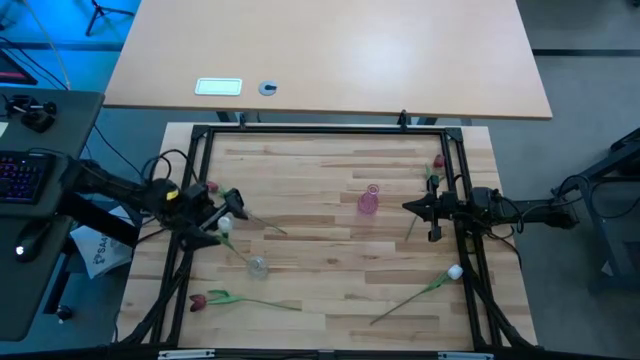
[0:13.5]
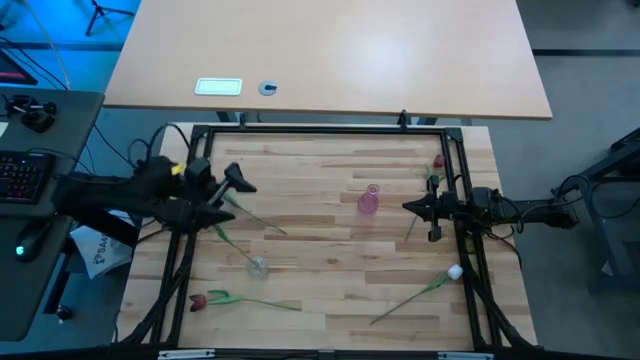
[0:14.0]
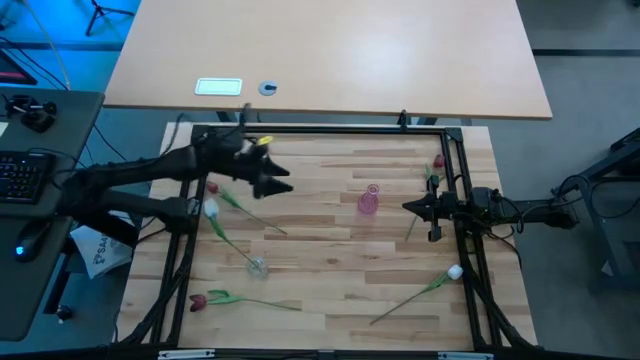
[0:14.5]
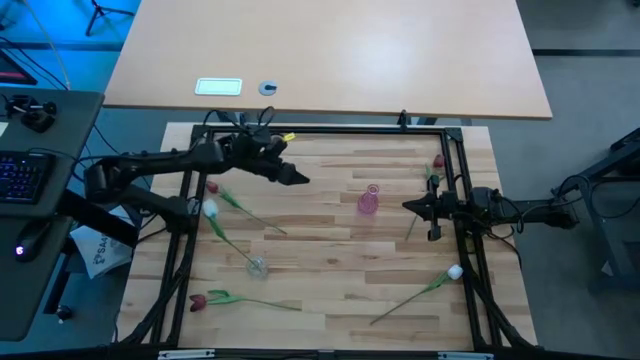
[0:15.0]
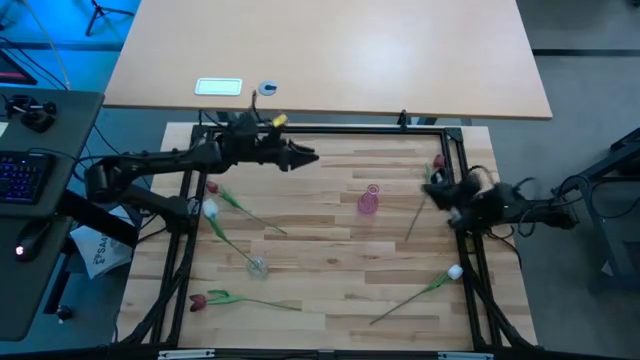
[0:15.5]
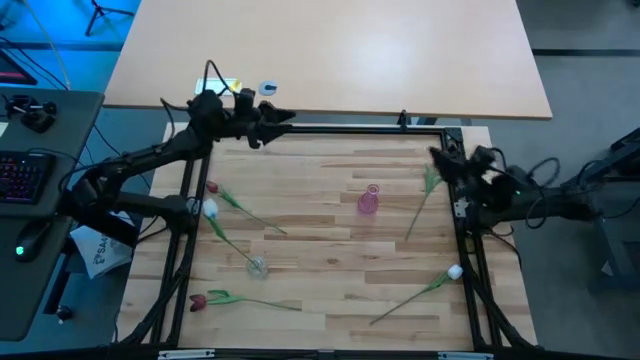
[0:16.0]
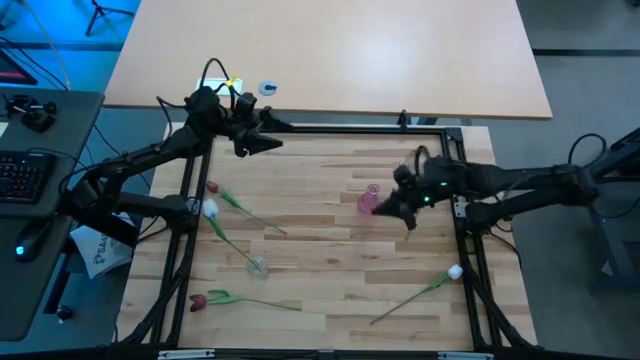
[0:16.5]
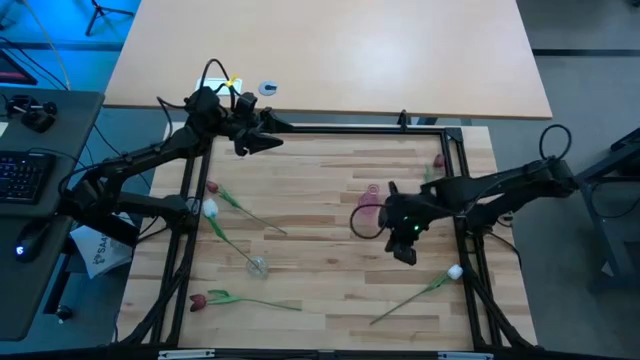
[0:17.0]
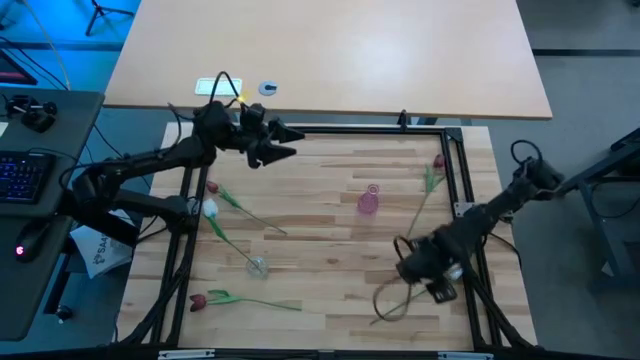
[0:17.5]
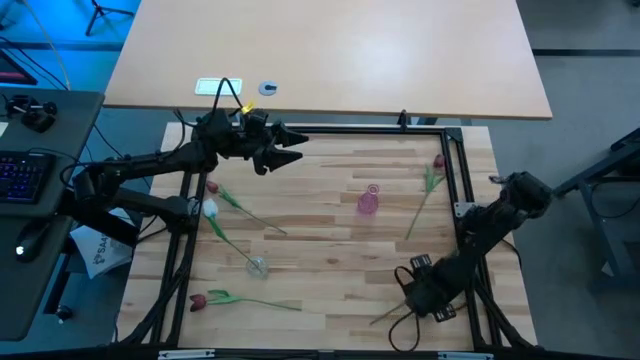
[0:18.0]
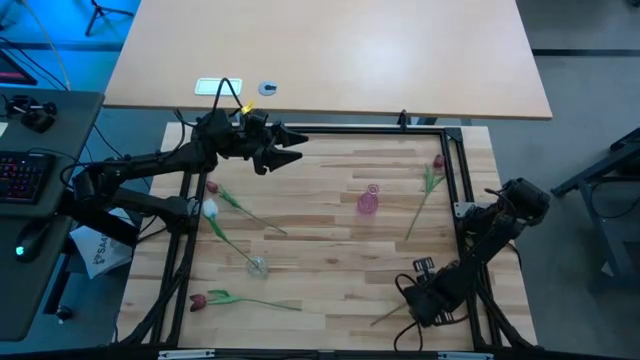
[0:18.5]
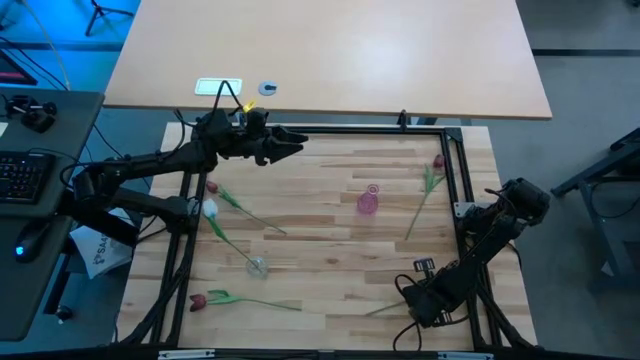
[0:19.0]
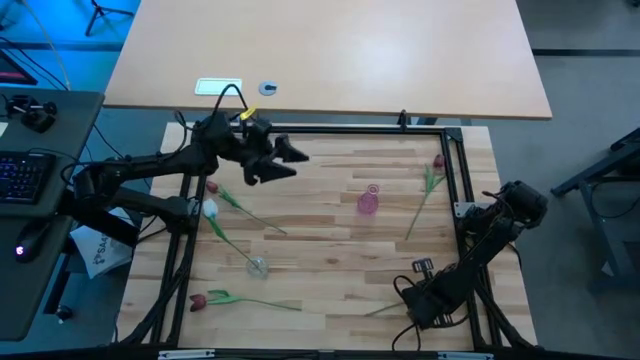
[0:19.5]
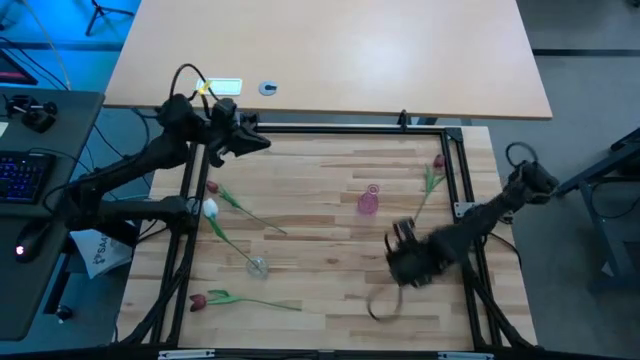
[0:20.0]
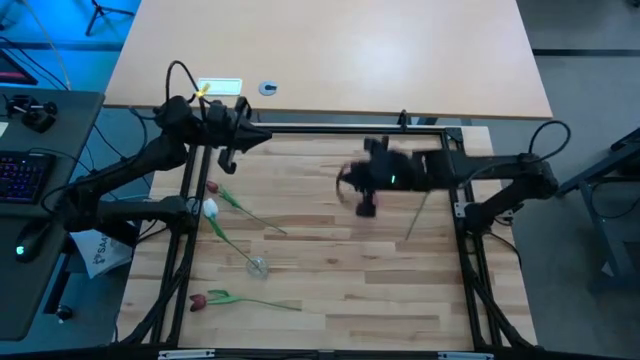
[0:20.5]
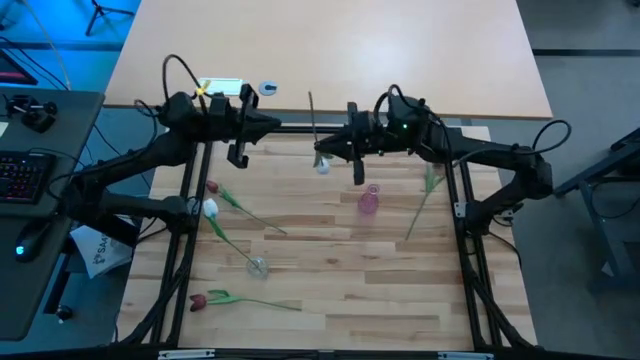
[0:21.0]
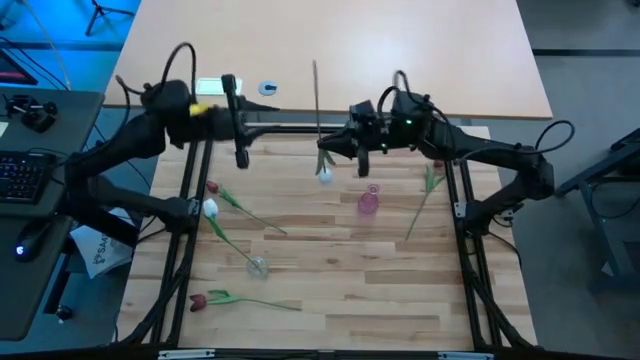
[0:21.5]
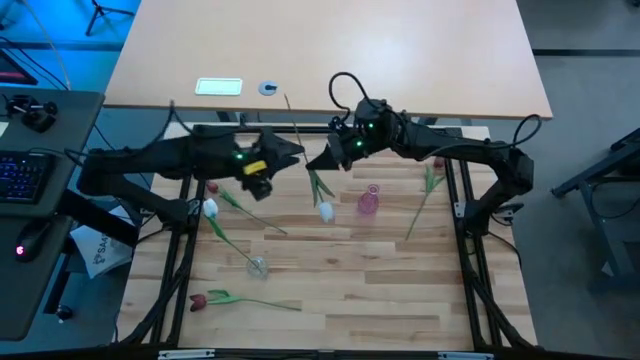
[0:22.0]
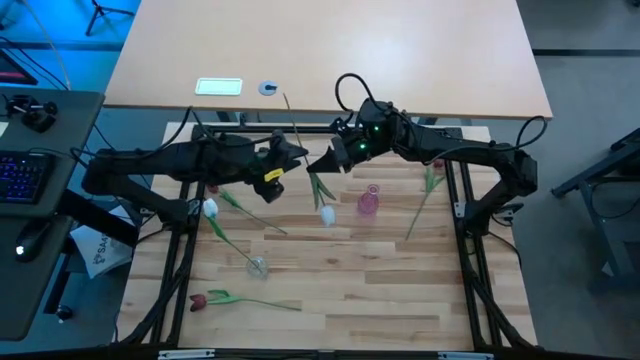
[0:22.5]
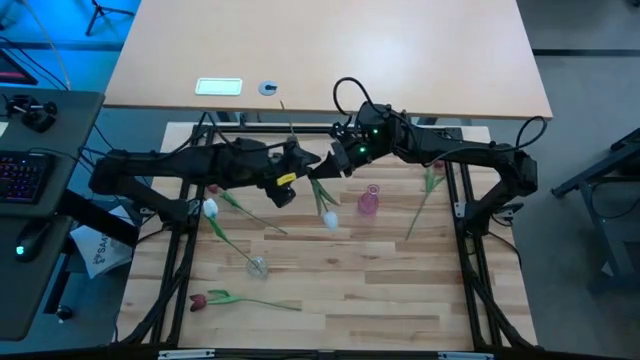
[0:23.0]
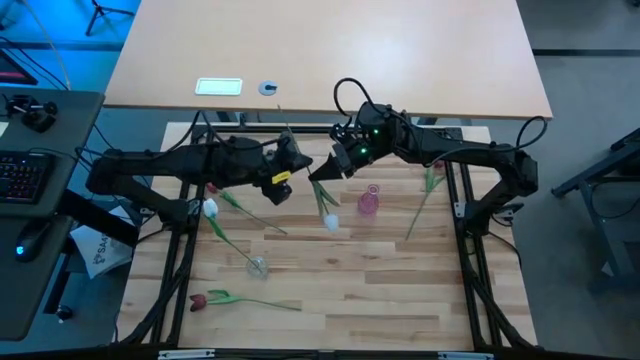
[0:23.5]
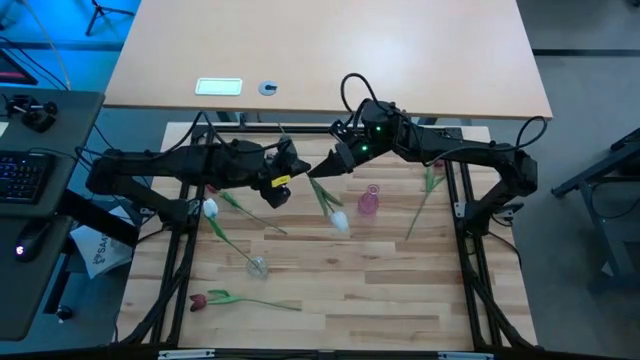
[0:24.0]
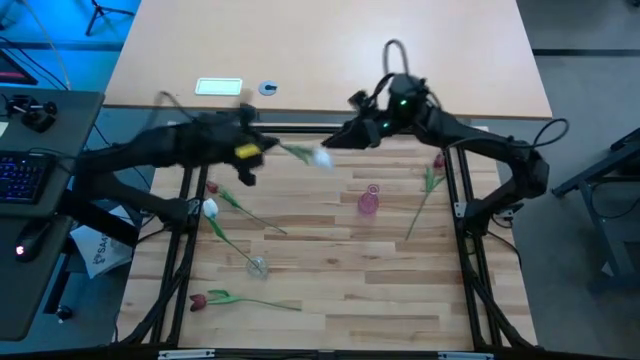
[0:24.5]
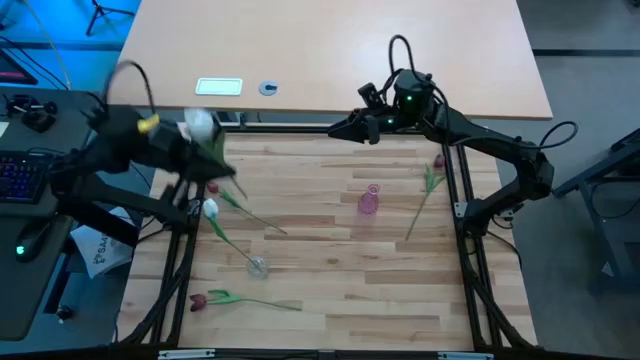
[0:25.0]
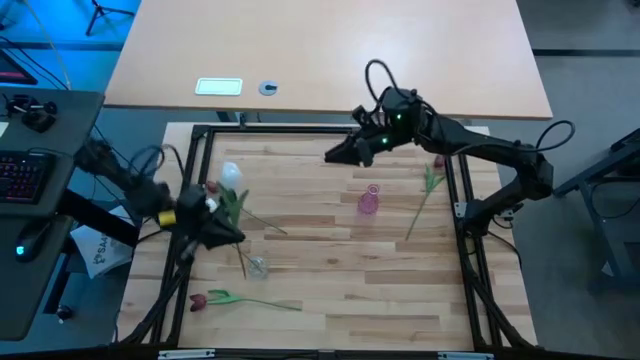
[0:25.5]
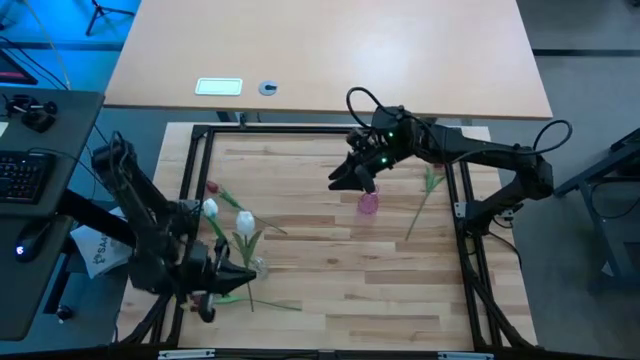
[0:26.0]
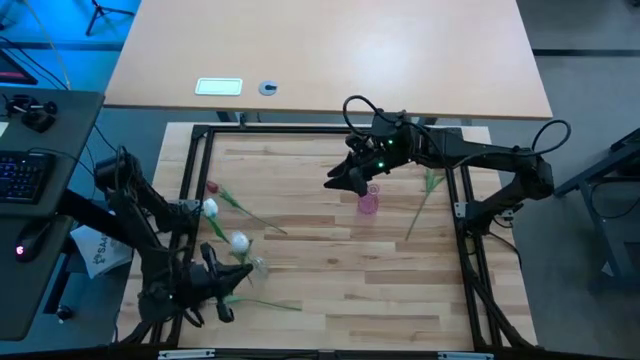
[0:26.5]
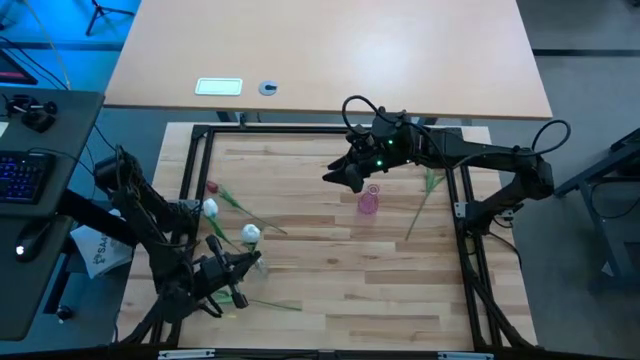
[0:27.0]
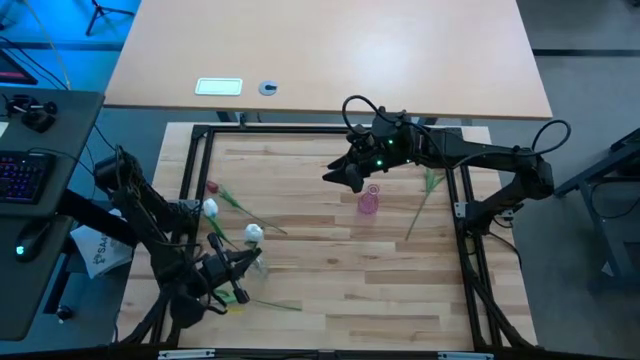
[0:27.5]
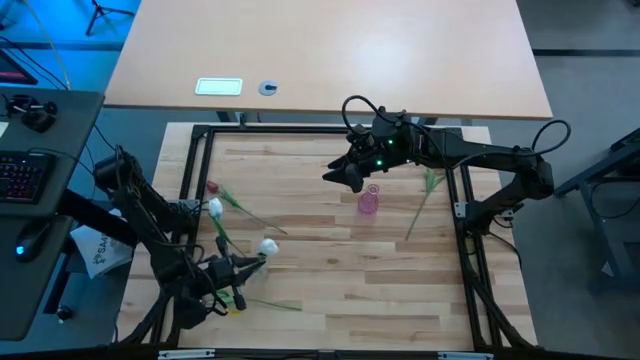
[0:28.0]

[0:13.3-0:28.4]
Task: Sort flowers into vase by color
Put the white flower into the transparent vase

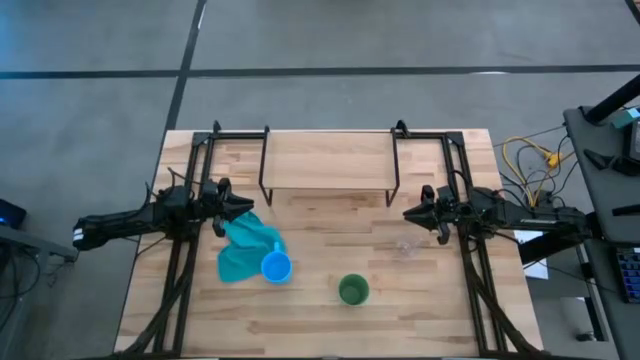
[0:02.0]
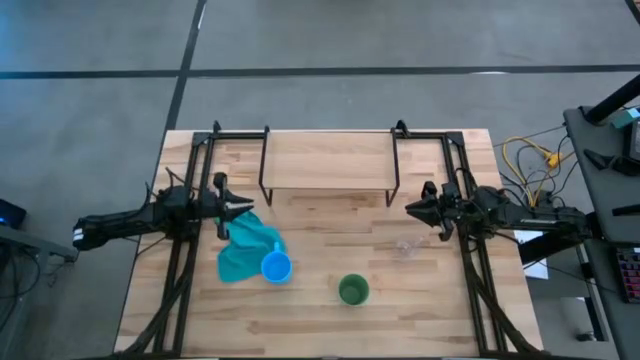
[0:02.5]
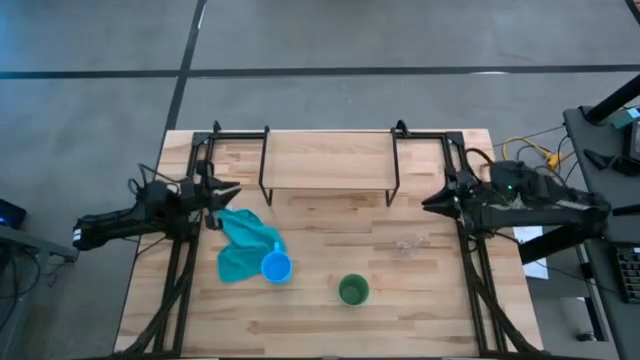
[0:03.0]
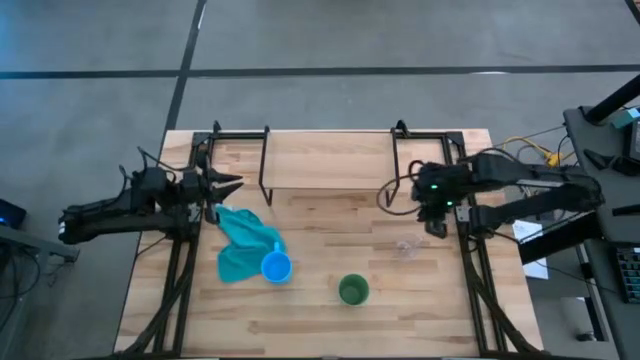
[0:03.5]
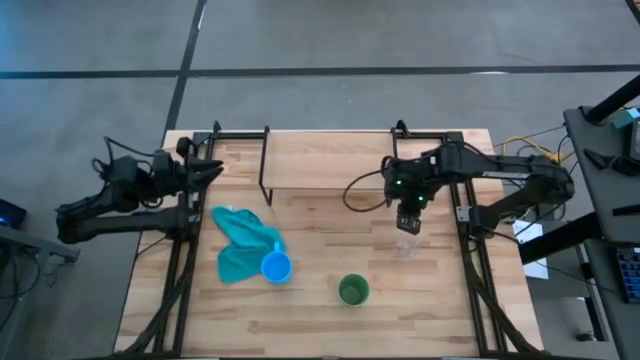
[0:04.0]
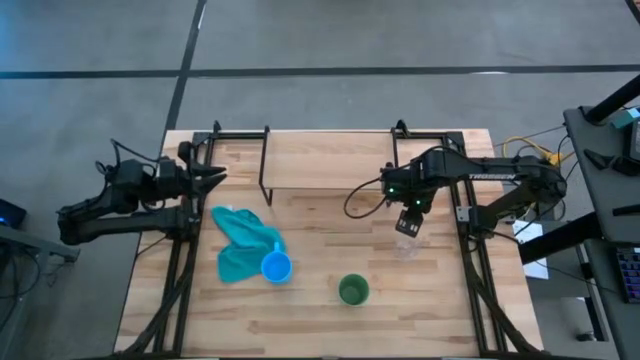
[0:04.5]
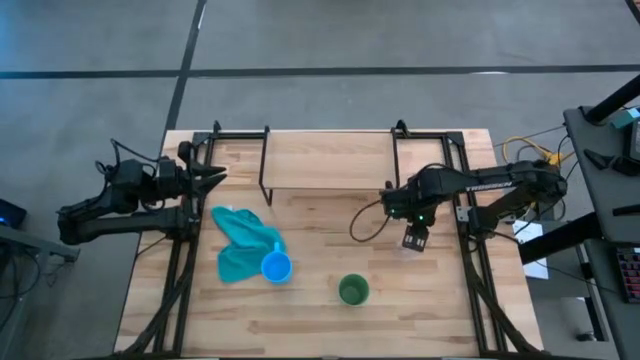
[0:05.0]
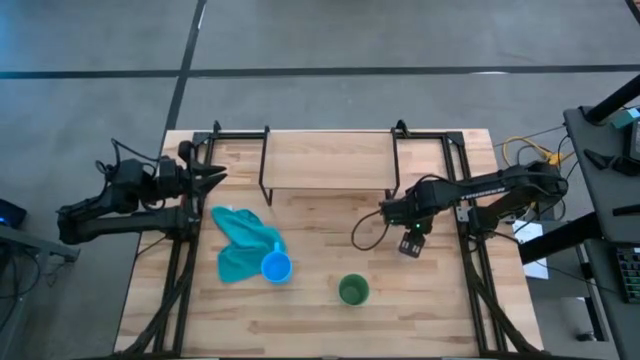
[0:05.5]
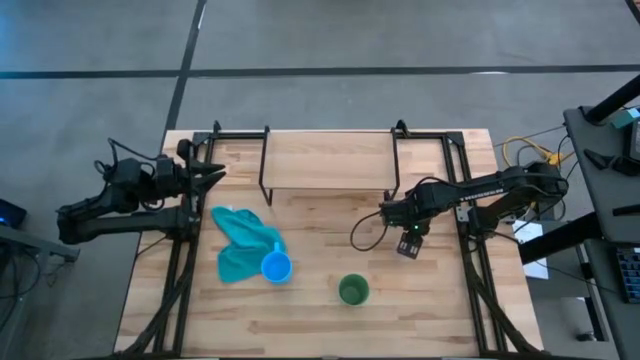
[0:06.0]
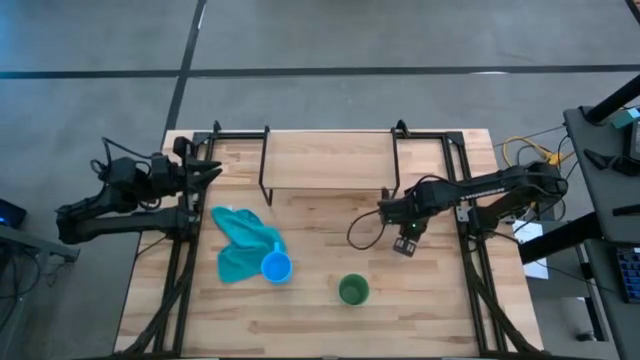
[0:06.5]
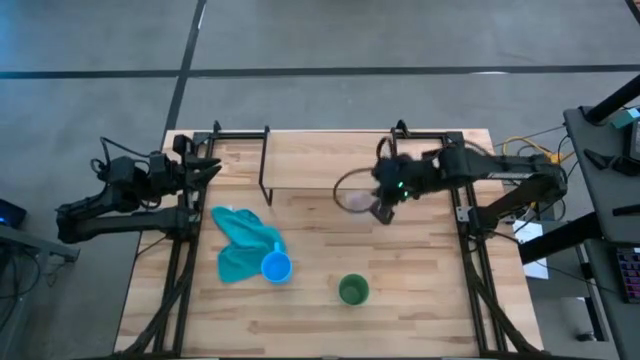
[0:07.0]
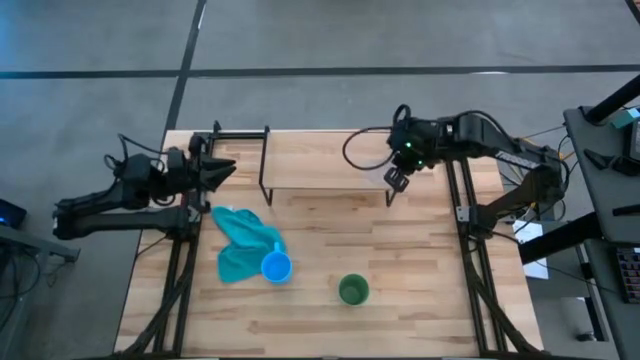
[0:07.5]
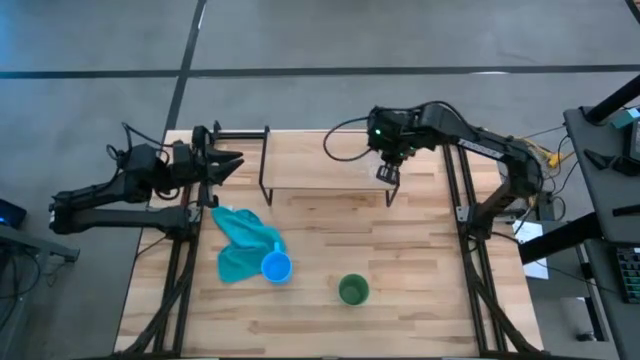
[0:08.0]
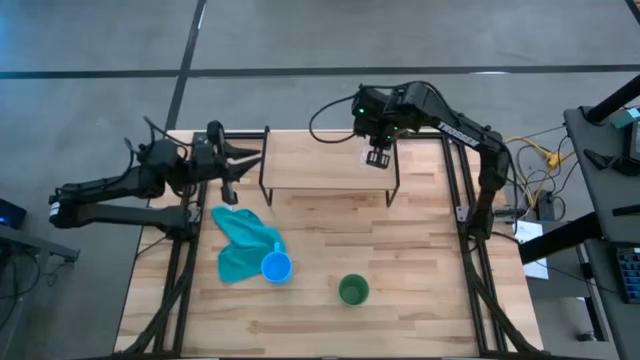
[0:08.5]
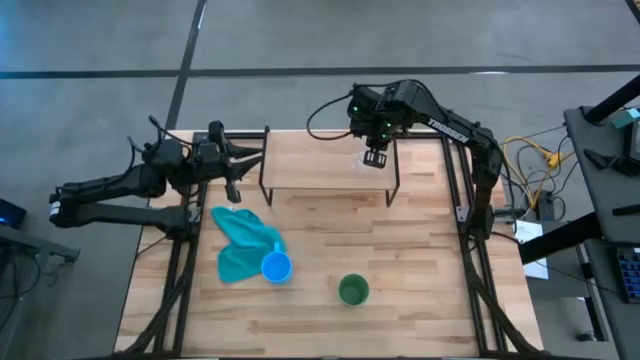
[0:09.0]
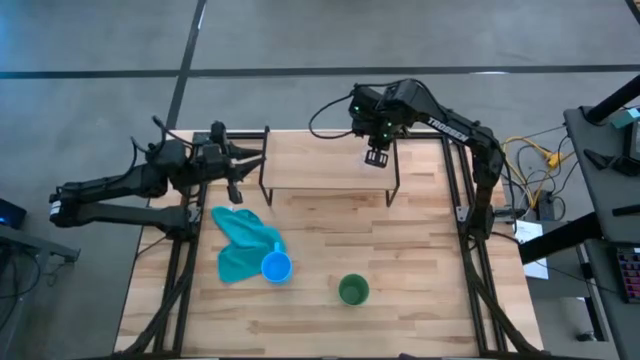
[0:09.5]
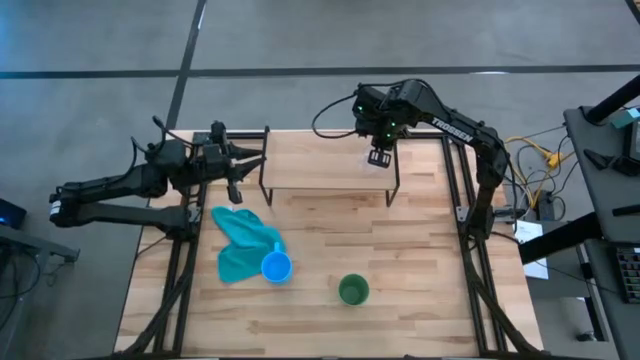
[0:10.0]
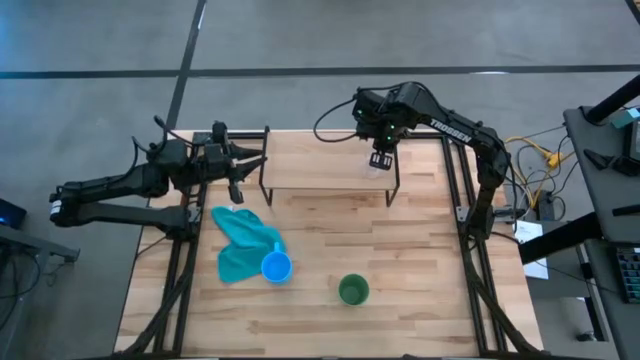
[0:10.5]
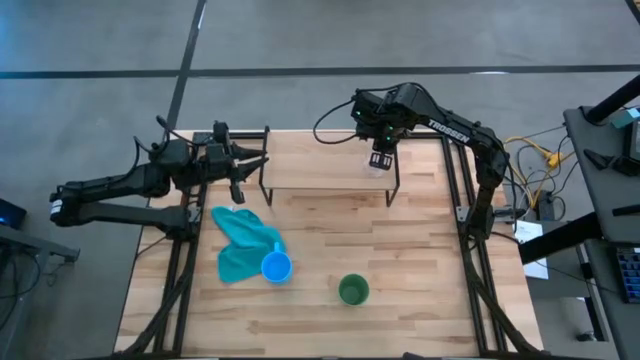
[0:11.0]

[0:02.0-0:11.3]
Task: Stack small to large cups/mugs on shelf
Put the transparent mug on the shelf
